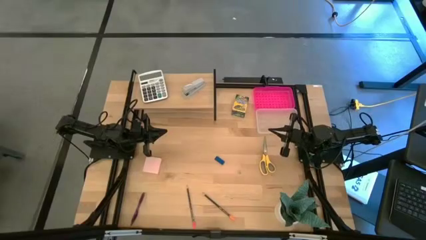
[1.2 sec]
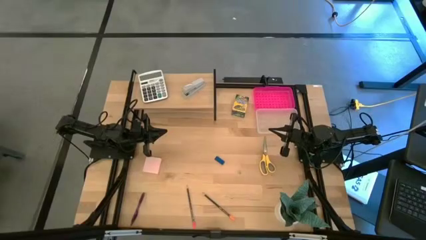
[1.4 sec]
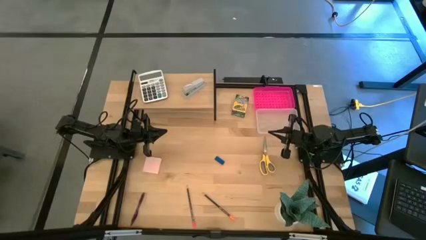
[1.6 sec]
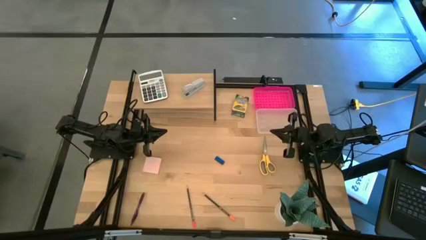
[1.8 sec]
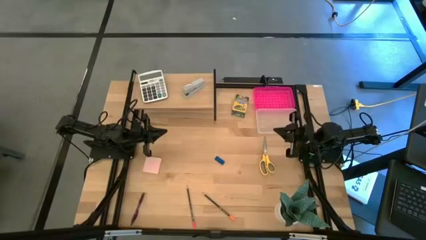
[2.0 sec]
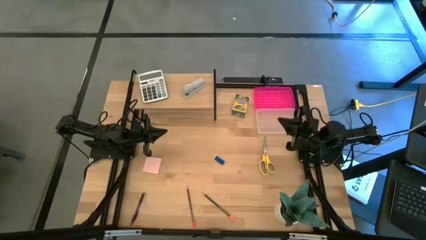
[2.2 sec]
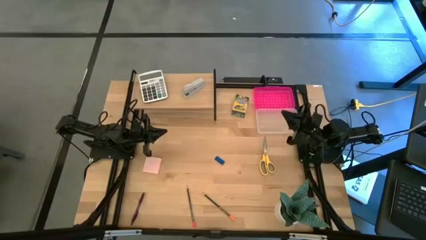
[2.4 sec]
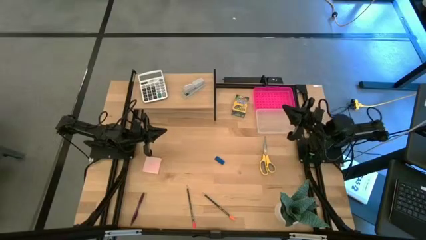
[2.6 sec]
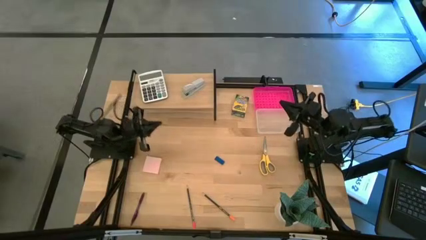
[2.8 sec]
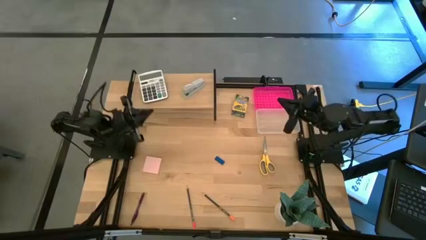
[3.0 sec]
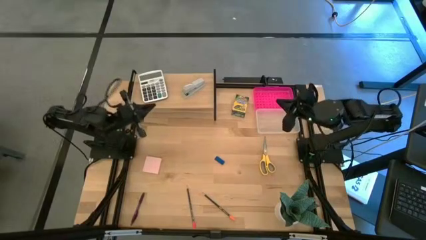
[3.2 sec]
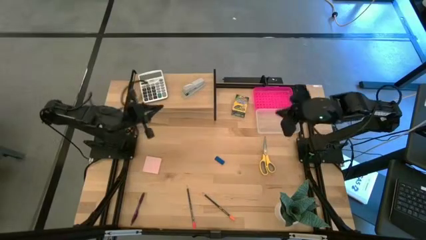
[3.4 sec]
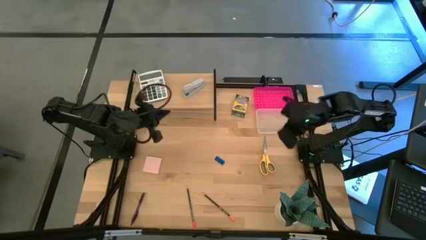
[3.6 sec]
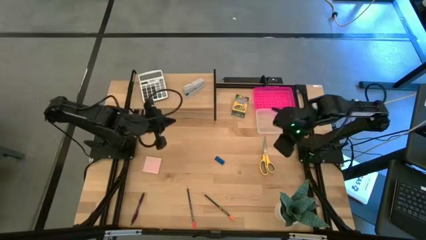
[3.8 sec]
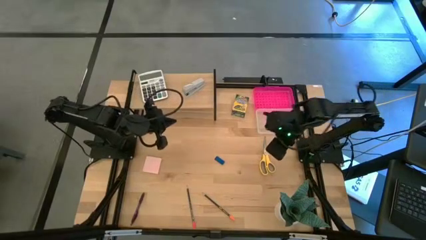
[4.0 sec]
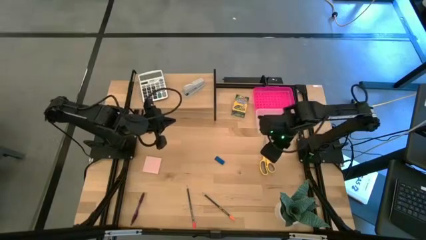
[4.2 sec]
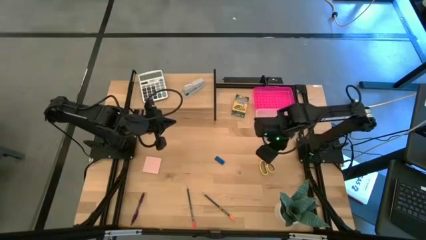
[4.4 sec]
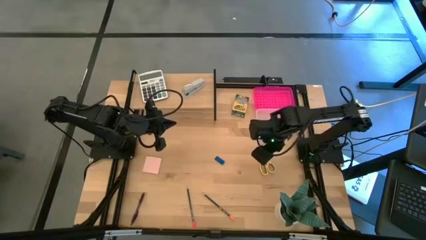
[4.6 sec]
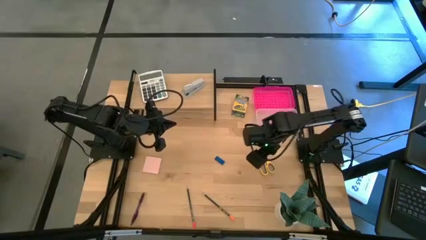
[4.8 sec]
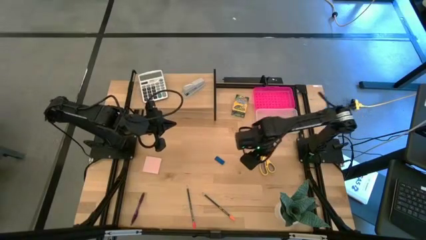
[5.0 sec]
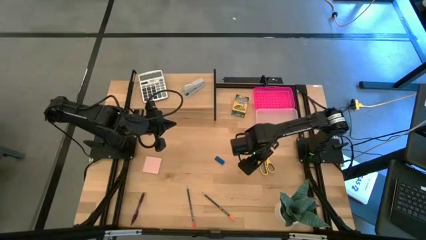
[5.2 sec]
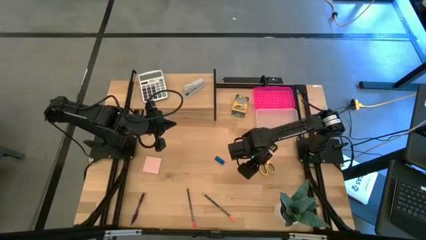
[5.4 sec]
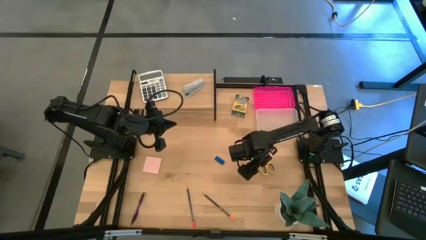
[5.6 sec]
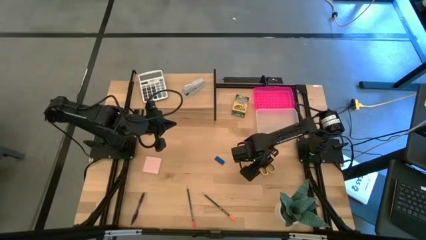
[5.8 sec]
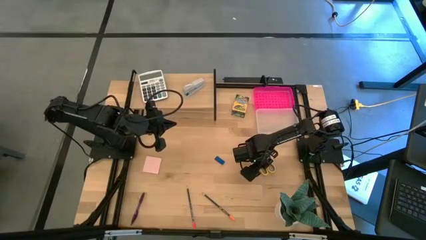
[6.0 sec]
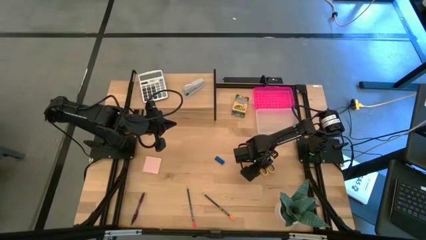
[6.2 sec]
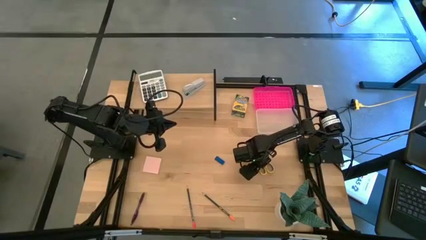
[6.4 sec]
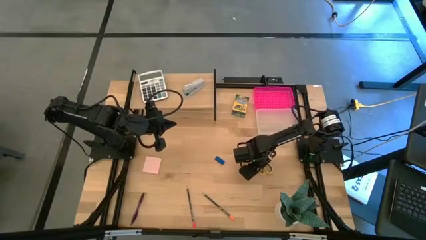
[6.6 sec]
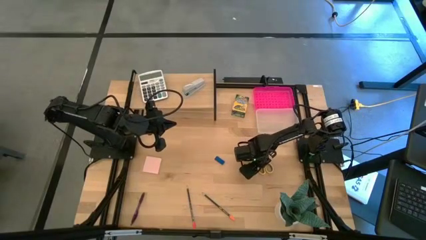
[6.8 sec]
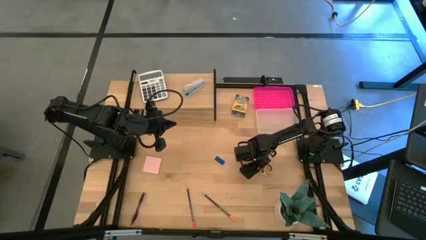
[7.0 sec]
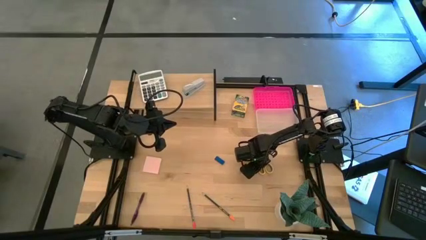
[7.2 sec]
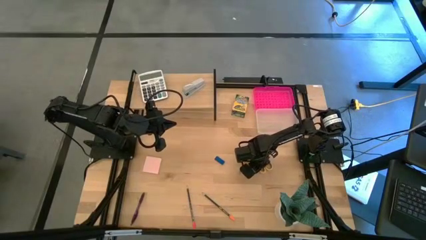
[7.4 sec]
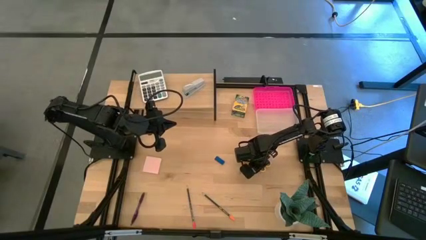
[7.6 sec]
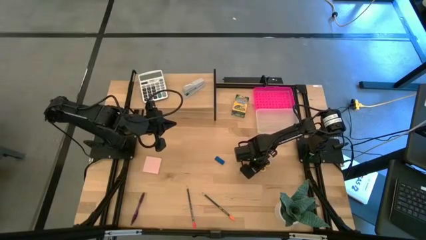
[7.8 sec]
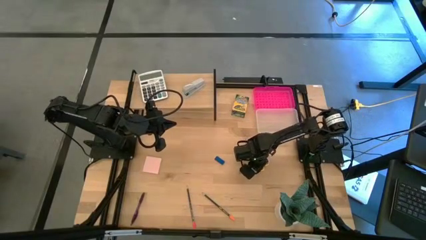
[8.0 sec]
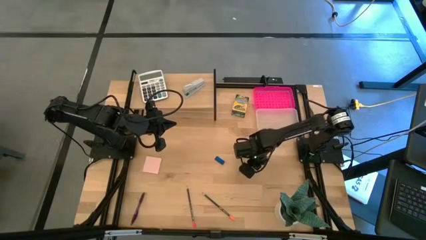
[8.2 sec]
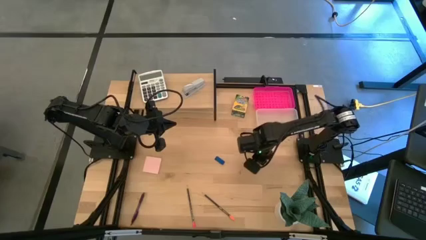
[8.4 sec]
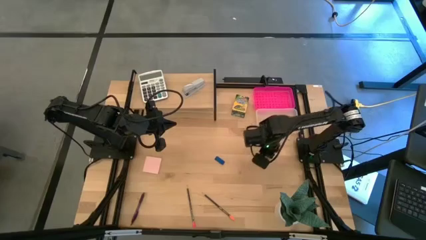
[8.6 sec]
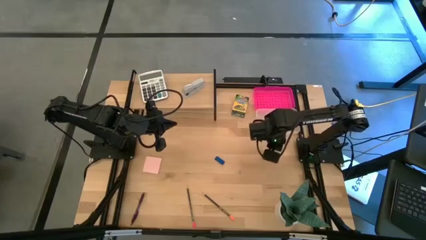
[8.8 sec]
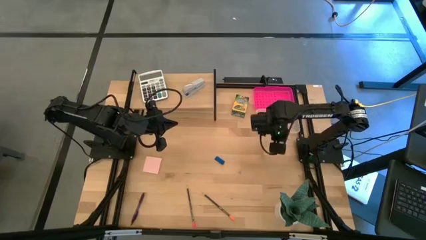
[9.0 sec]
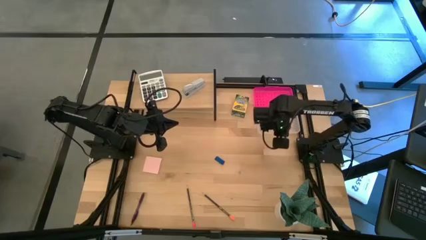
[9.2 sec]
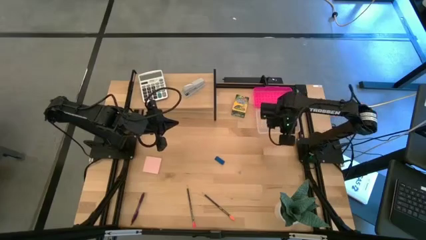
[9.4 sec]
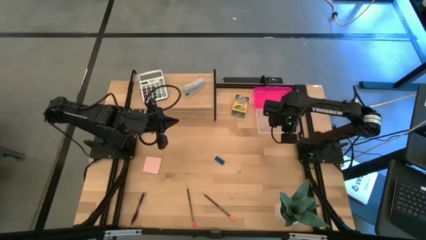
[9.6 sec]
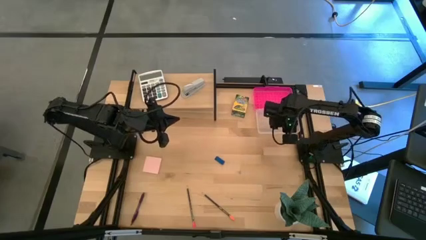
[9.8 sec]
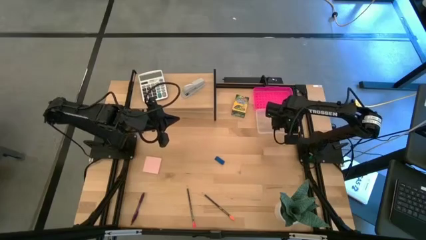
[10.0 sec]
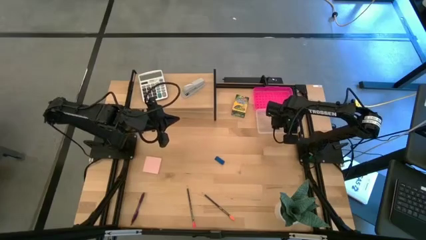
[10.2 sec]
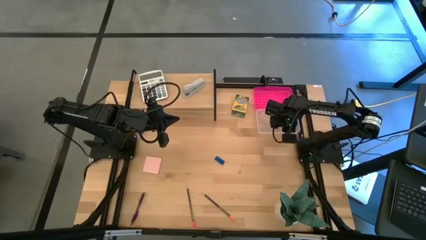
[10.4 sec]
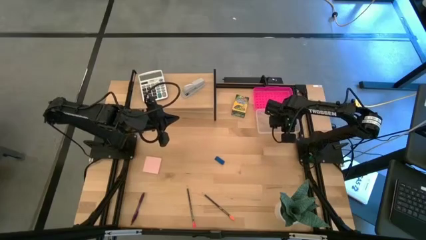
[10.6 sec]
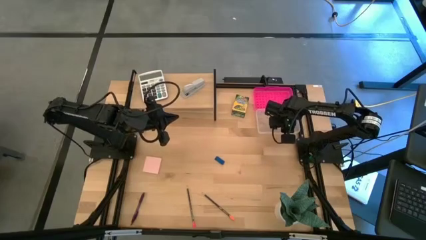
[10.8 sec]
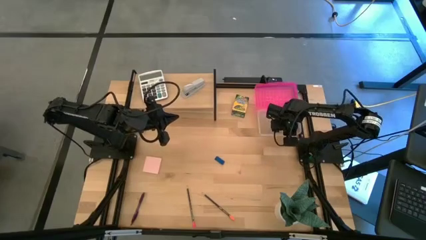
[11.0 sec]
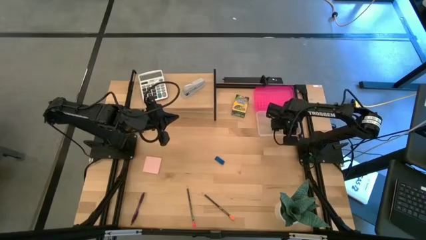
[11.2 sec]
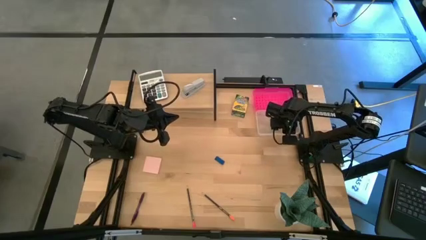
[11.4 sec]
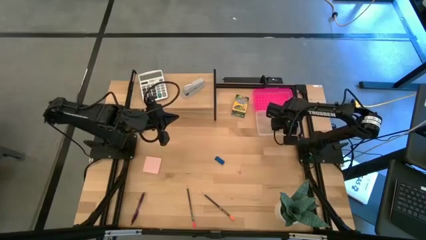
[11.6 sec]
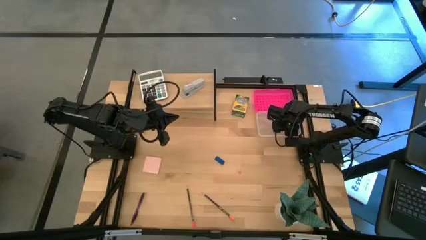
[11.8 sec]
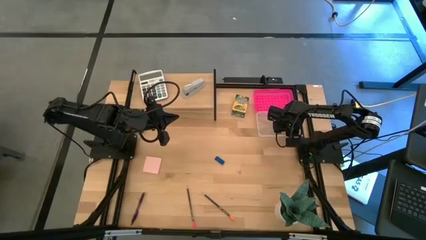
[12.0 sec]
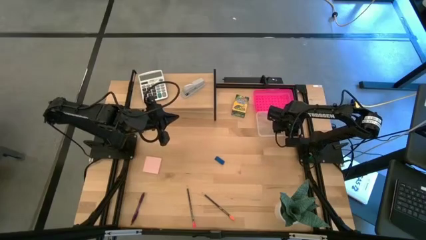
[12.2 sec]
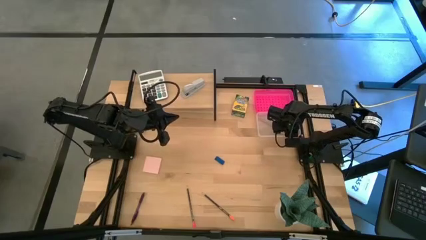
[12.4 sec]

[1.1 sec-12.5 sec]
Task: Pack school essentials
Put the yellow scissors into the pink supply box

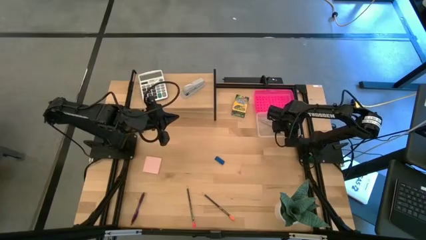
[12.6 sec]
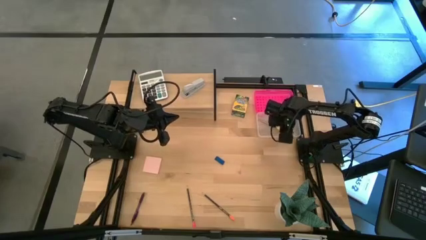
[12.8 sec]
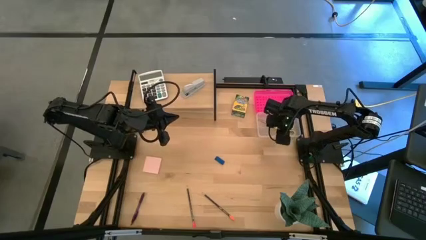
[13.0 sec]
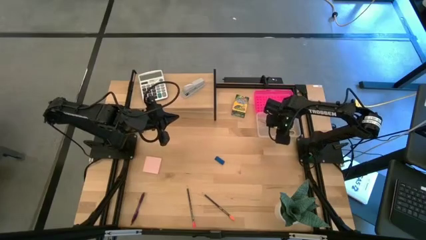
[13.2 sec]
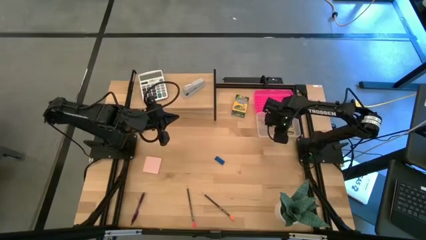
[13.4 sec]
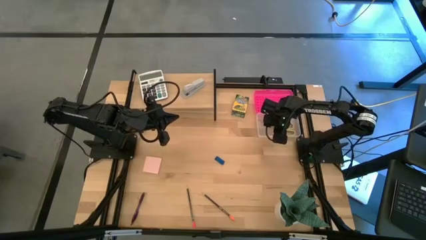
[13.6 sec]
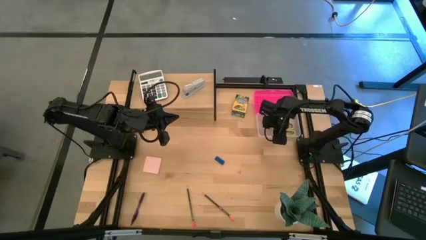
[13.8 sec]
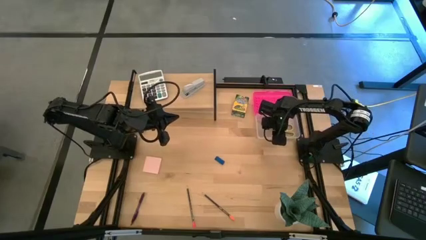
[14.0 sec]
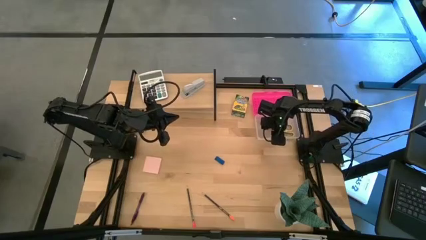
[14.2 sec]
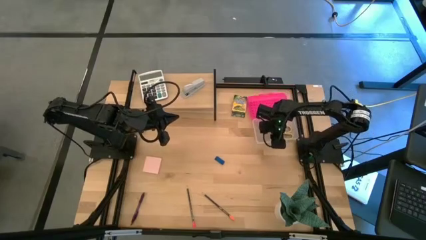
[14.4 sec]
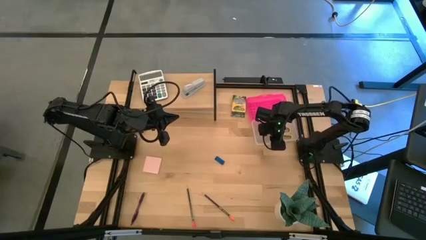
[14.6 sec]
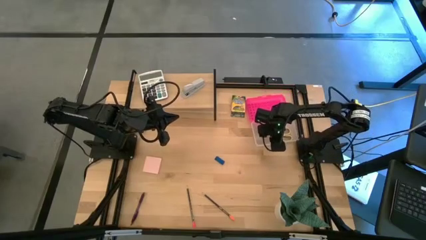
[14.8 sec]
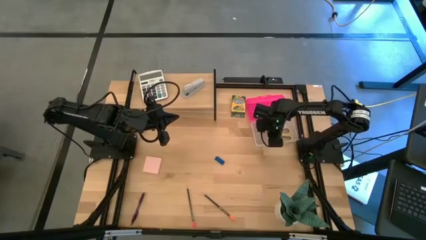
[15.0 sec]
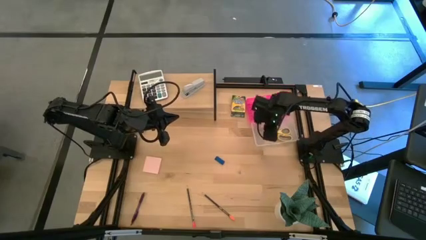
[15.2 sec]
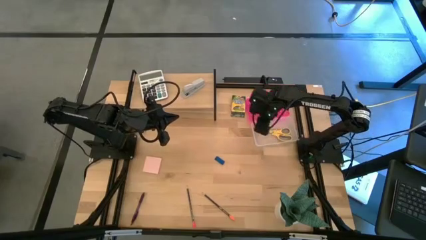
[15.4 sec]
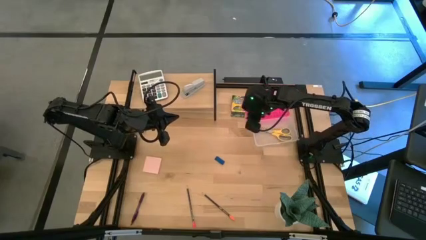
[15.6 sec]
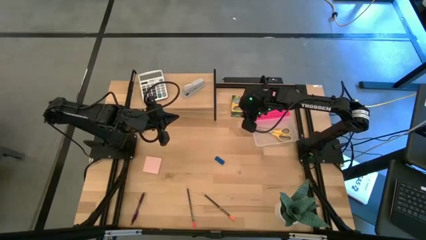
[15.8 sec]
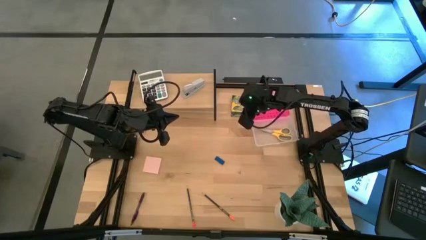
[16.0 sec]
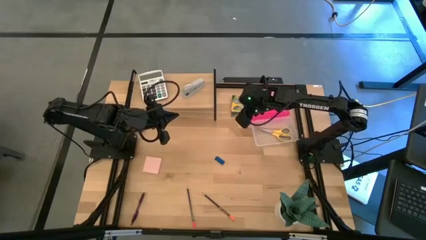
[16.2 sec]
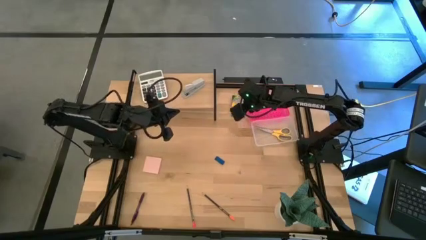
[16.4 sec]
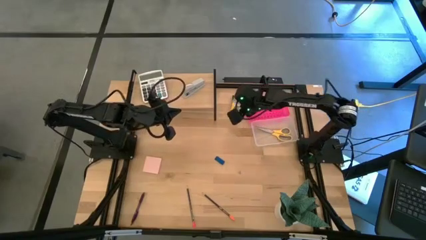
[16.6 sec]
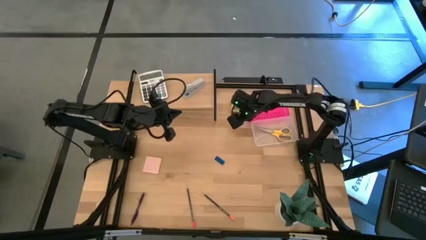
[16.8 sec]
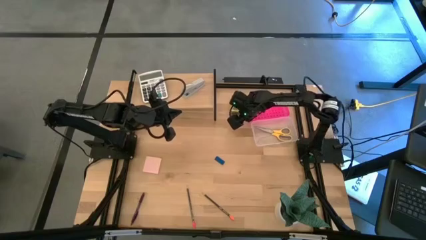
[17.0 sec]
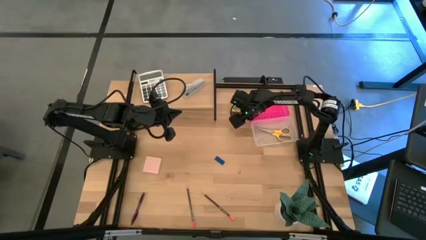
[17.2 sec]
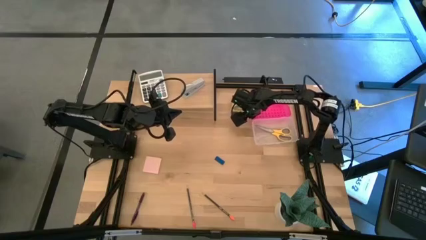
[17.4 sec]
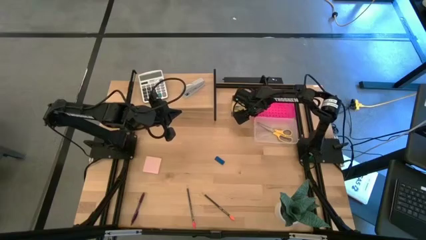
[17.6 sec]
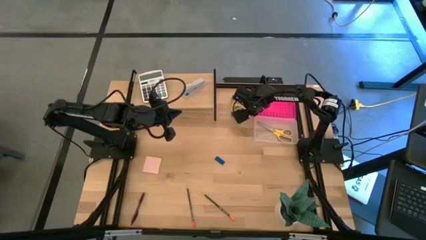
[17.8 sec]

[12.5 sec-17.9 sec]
Adjust the pink supply box

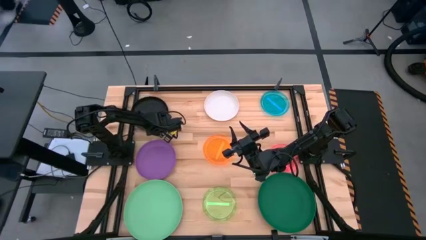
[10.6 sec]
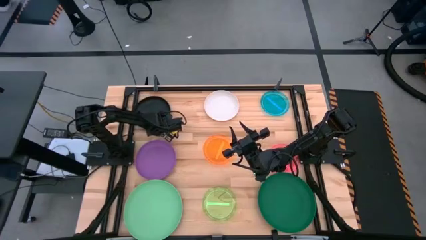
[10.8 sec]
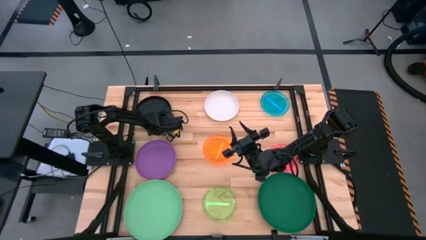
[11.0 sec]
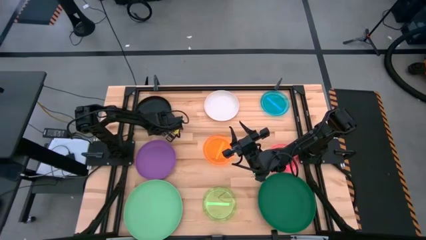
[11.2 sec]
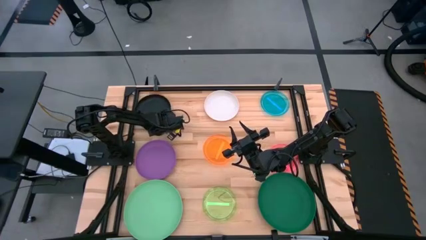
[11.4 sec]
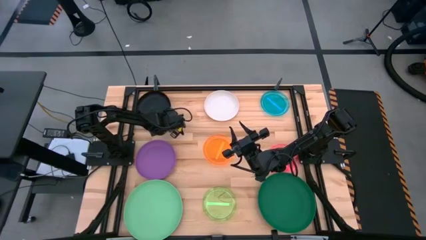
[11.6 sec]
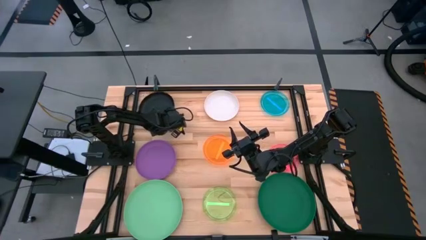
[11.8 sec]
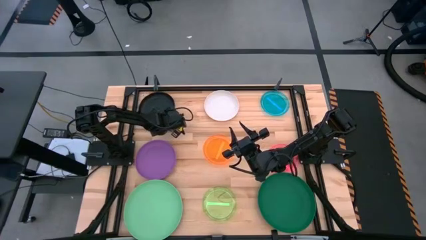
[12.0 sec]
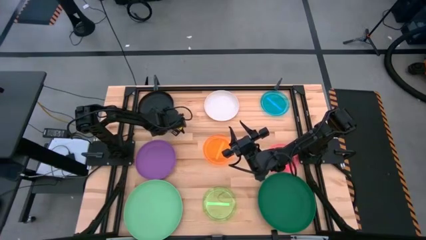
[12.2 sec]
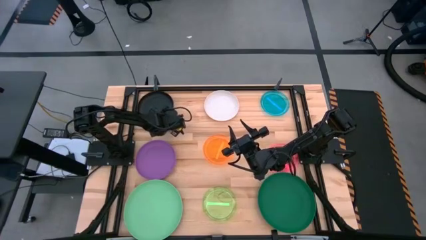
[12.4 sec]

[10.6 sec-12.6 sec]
Task: Stack plastic plates
Prepare the black plate on the table
